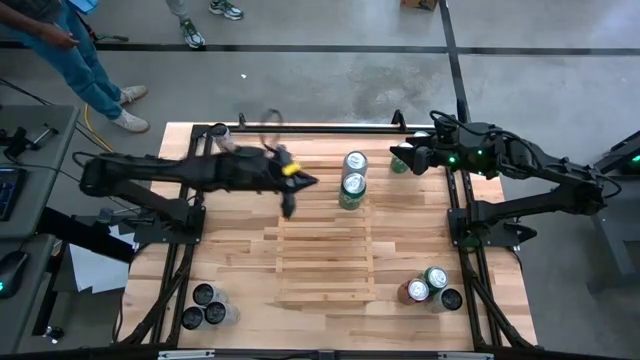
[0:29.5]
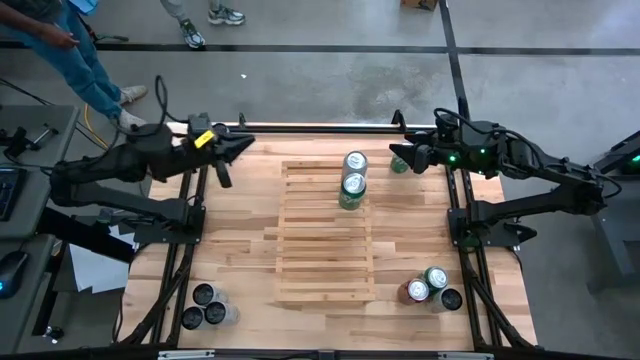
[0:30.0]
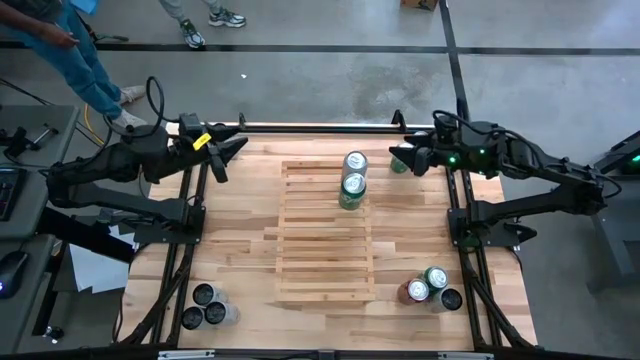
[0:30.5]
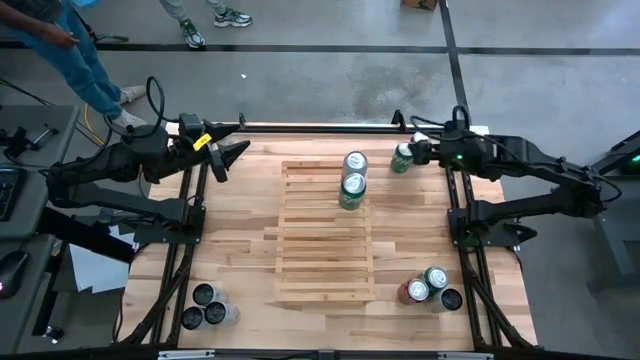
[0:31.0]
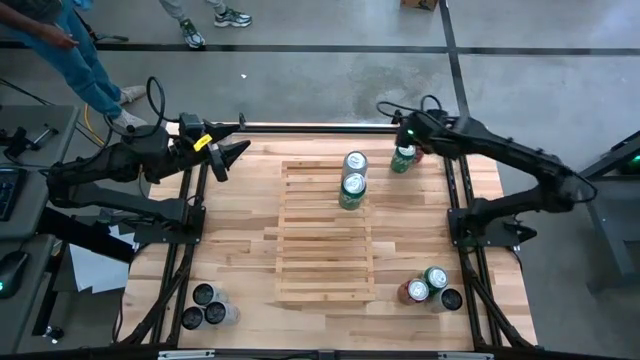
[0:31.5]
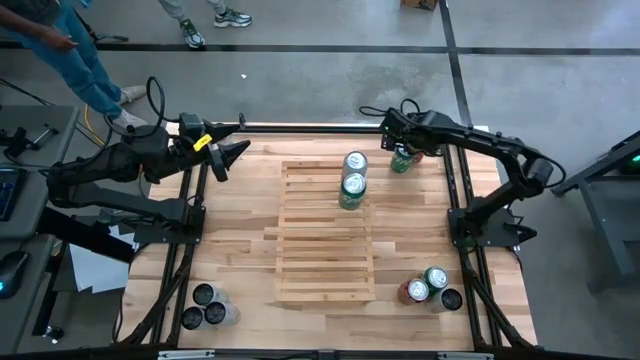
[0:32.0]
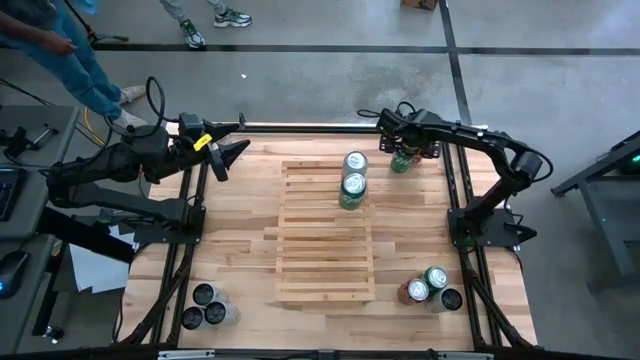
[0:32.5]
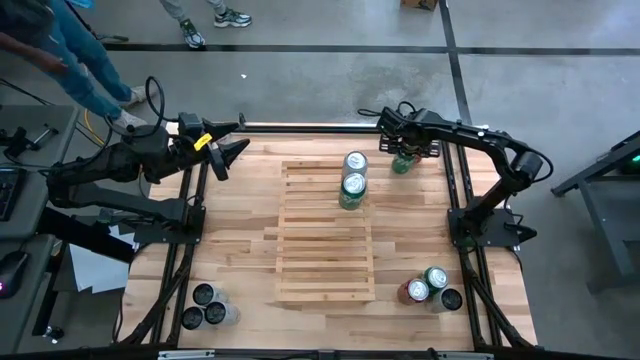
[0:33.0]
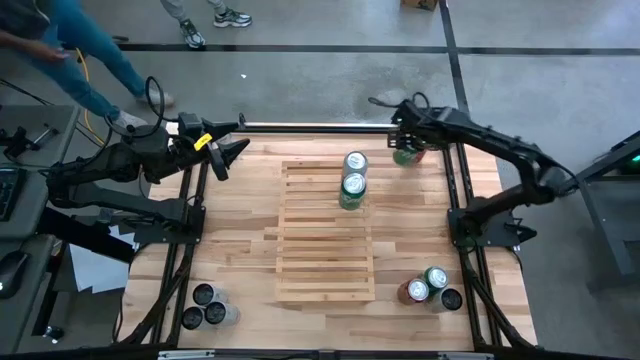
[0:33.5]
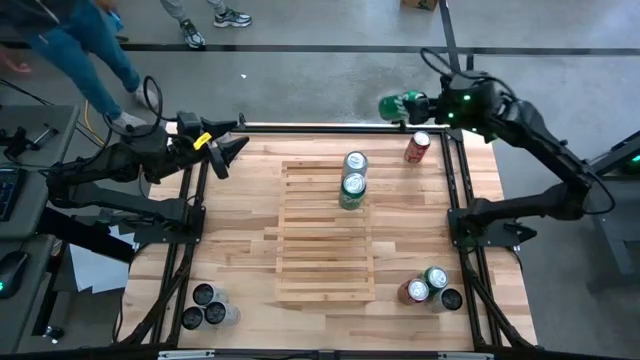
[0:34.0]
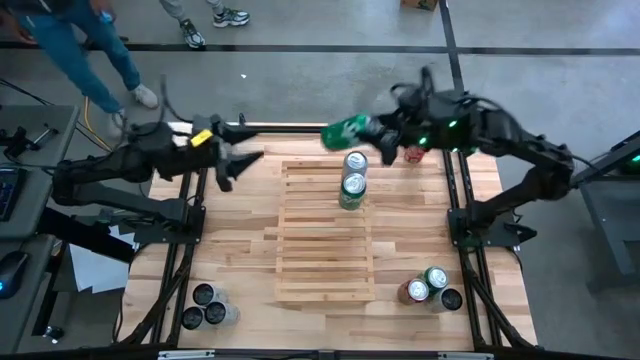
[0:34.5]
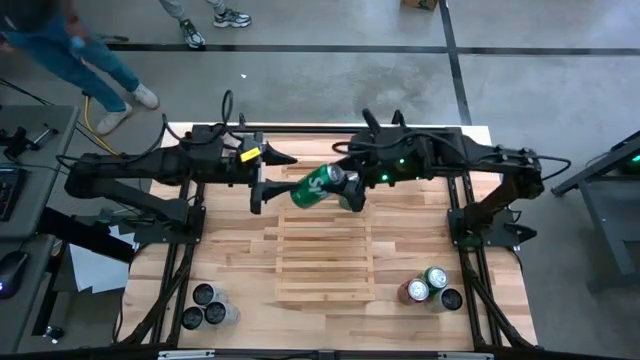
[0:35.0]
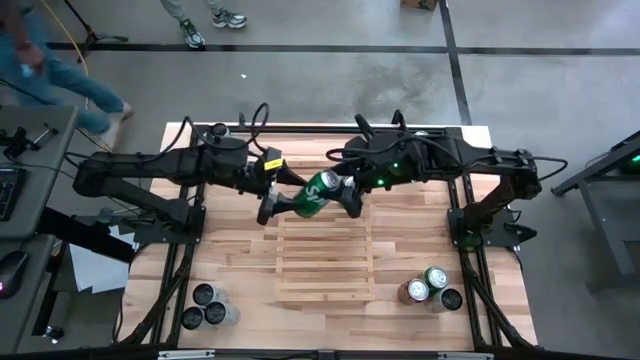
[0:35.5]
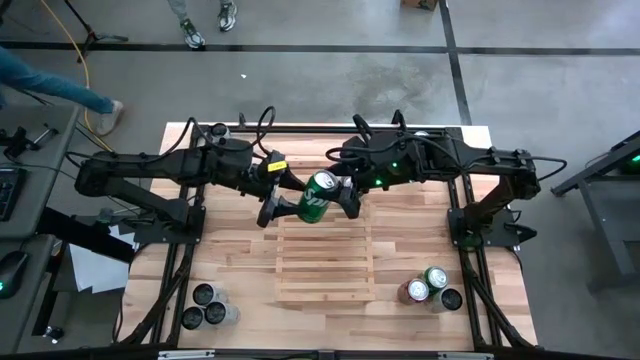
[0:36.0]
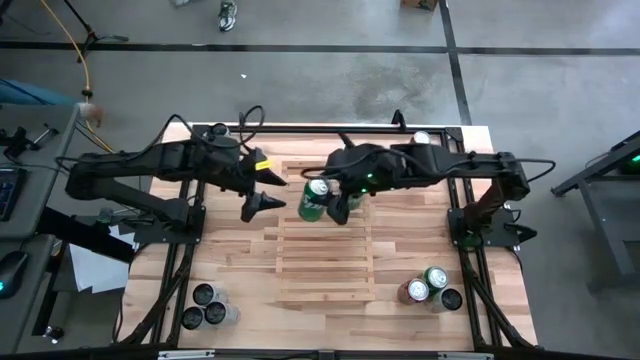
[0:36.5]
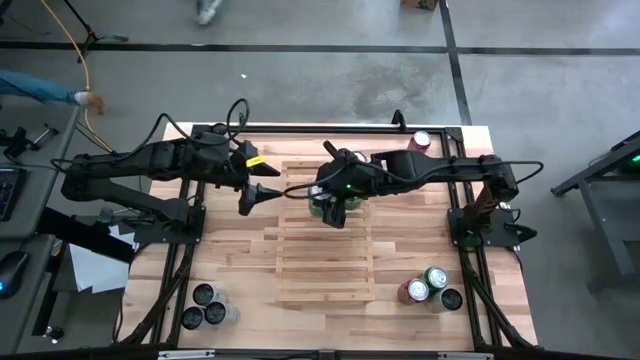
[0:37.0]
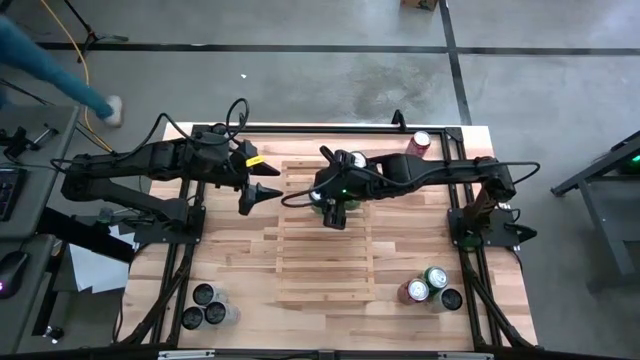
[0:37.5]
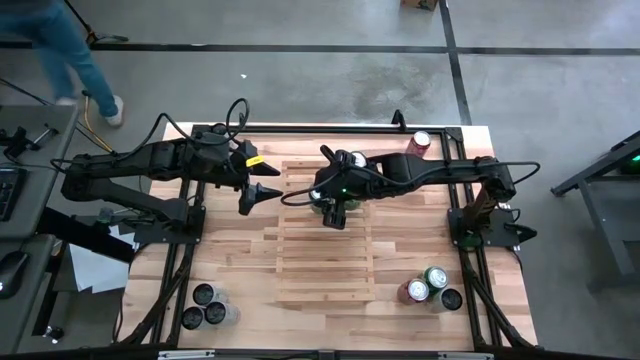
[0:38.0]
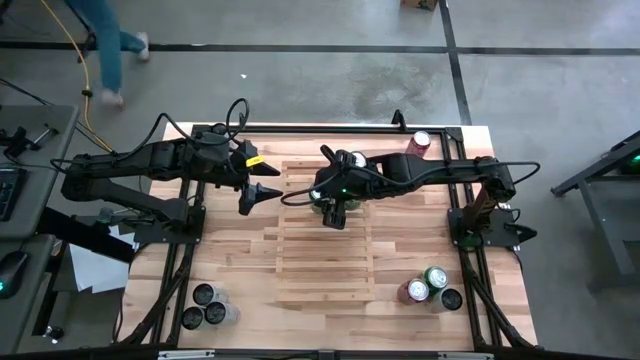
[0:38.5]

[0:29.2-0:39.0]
Task: Place canned beverage on shelf
Put the top green soda can on the shelf aligned with the other green soda can

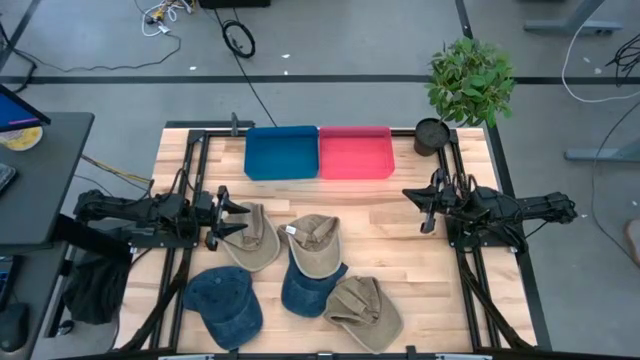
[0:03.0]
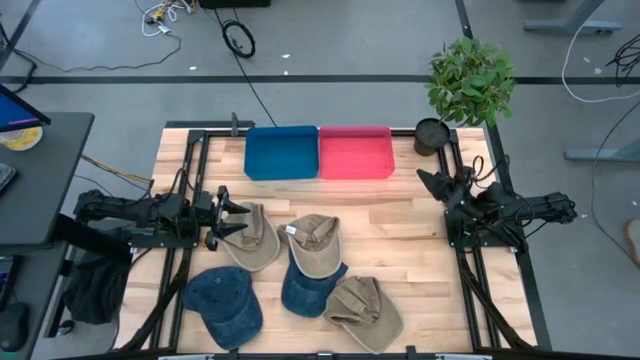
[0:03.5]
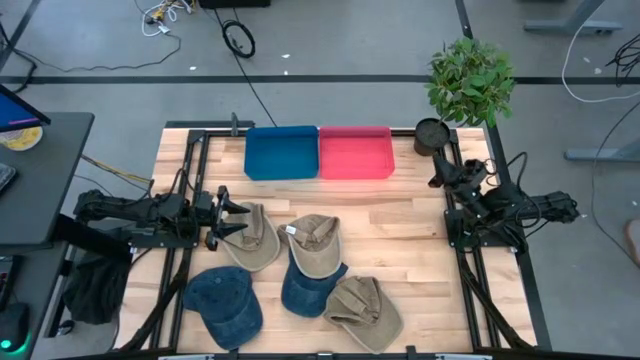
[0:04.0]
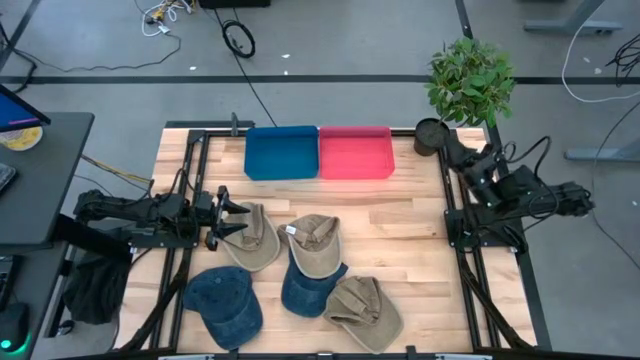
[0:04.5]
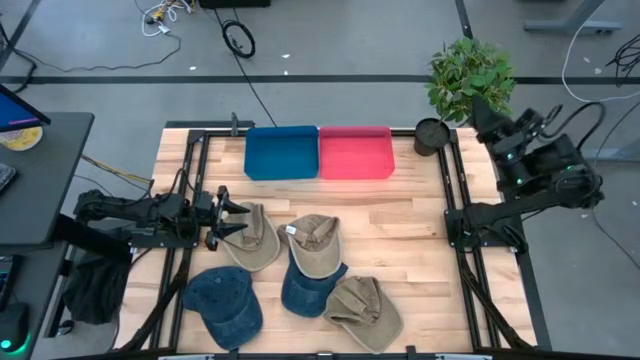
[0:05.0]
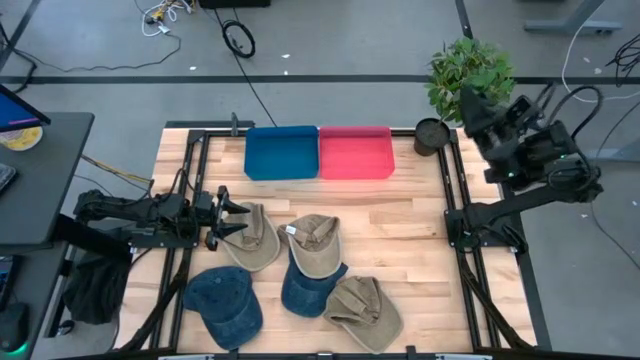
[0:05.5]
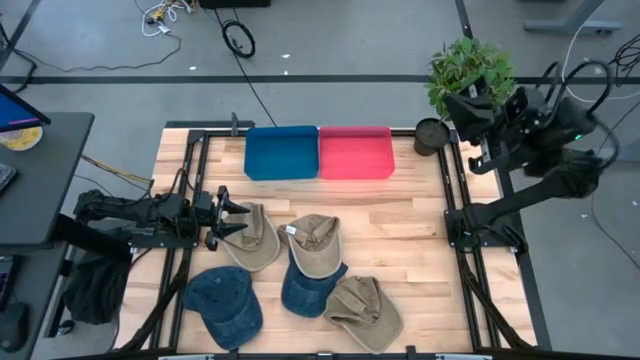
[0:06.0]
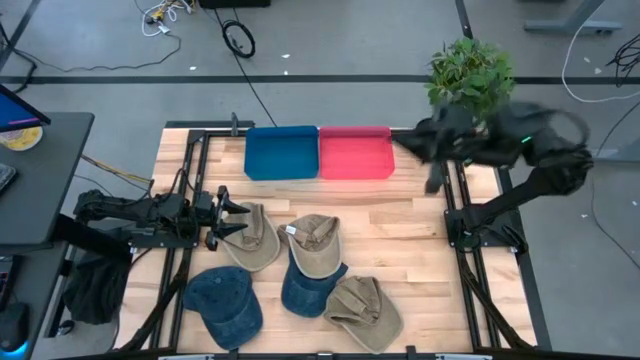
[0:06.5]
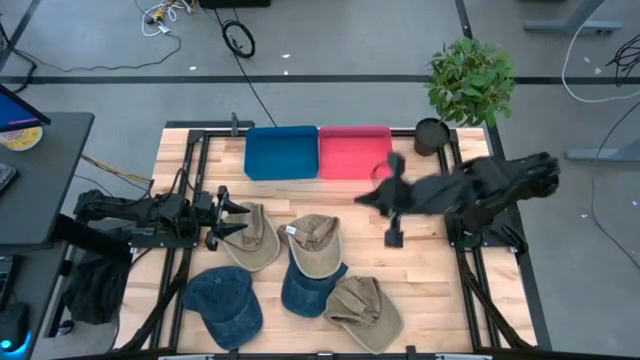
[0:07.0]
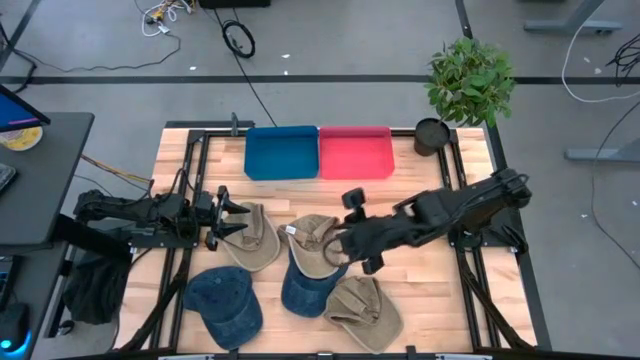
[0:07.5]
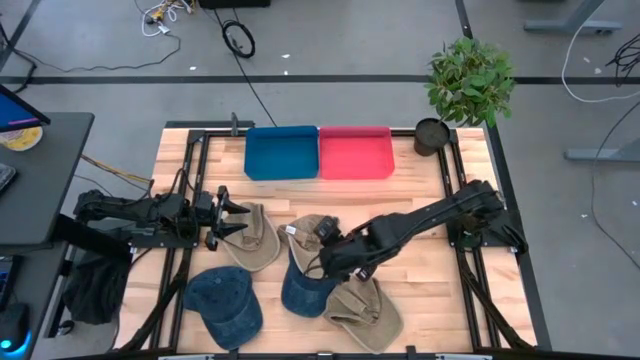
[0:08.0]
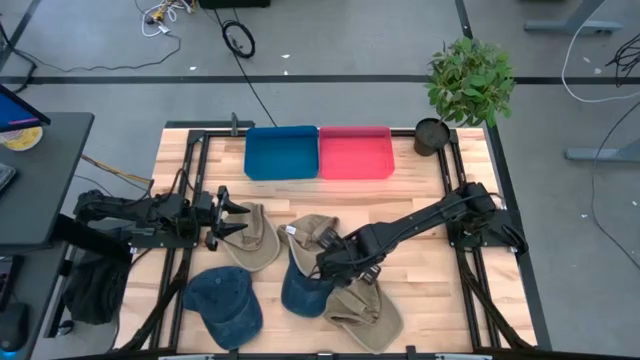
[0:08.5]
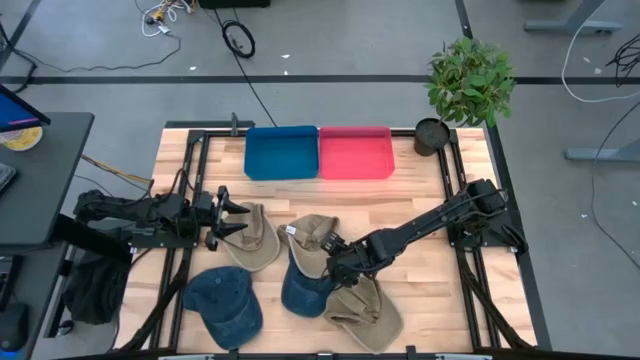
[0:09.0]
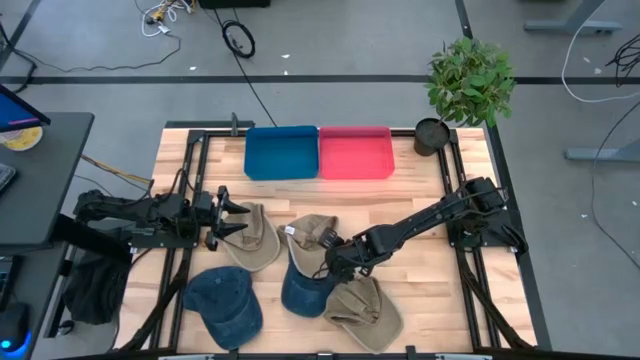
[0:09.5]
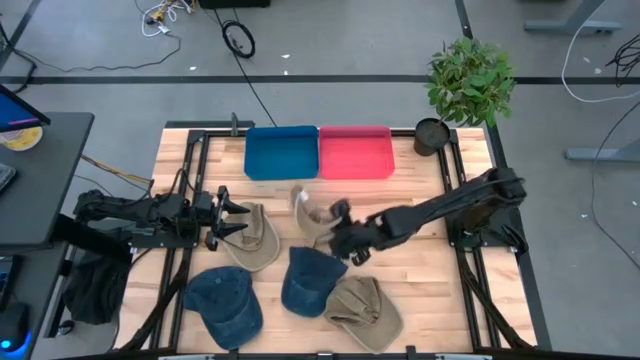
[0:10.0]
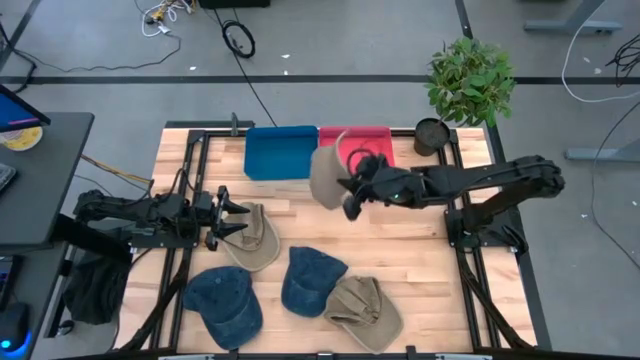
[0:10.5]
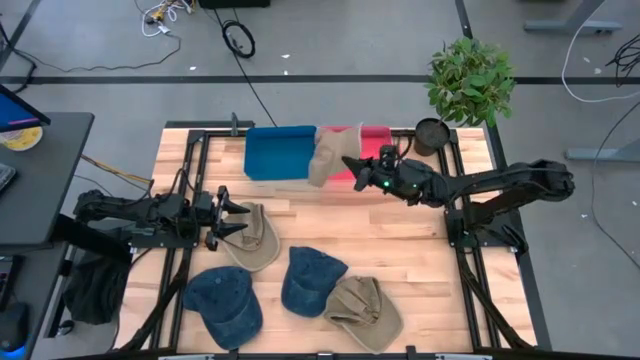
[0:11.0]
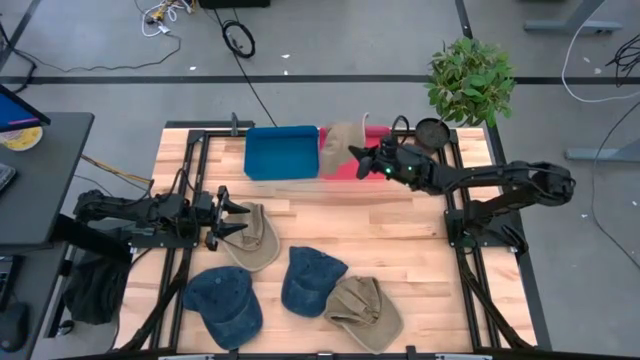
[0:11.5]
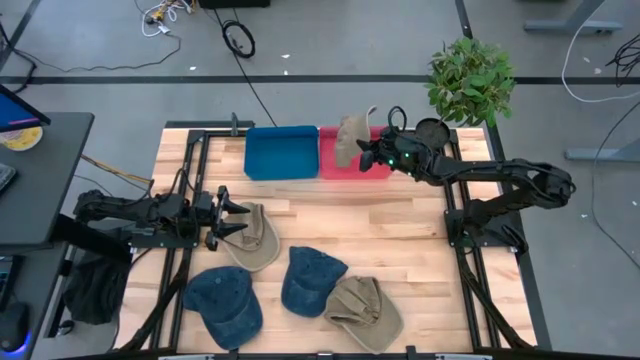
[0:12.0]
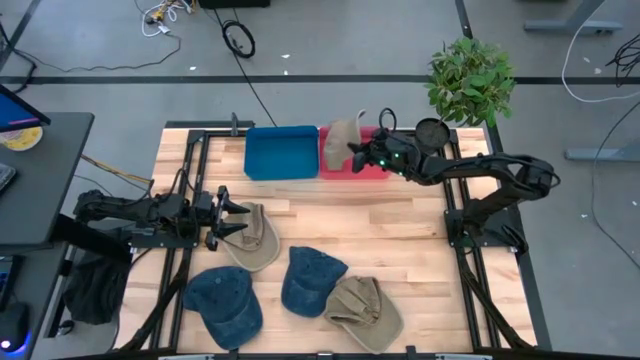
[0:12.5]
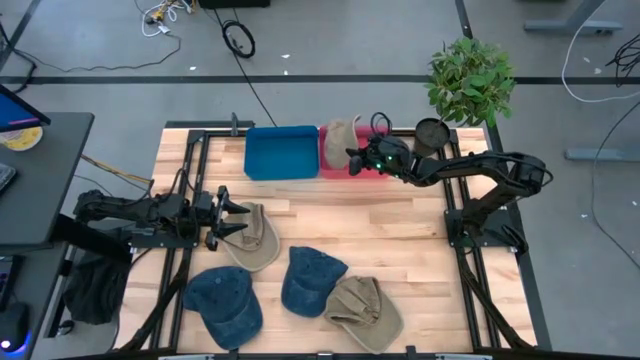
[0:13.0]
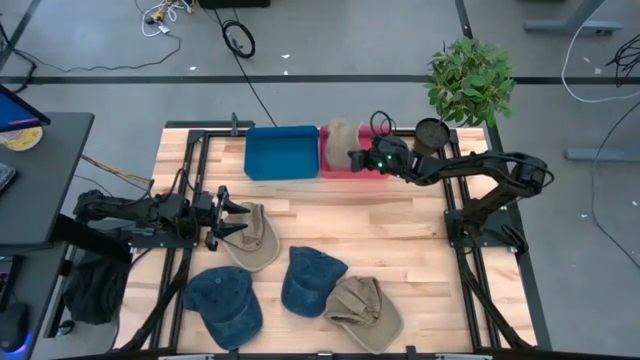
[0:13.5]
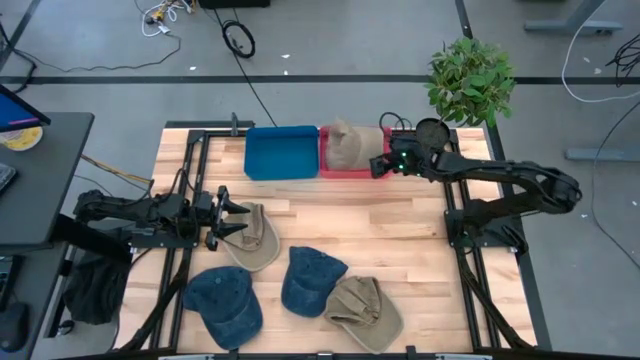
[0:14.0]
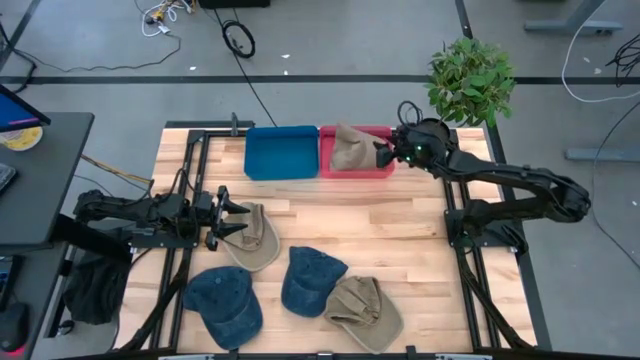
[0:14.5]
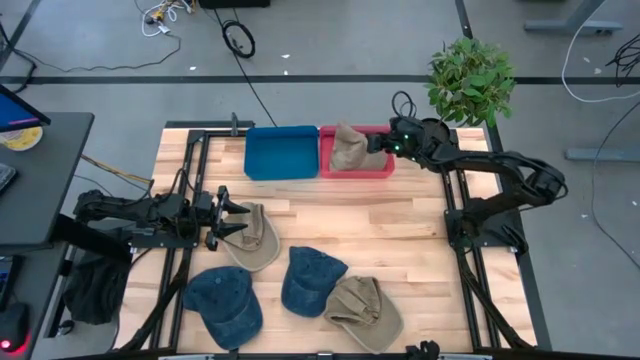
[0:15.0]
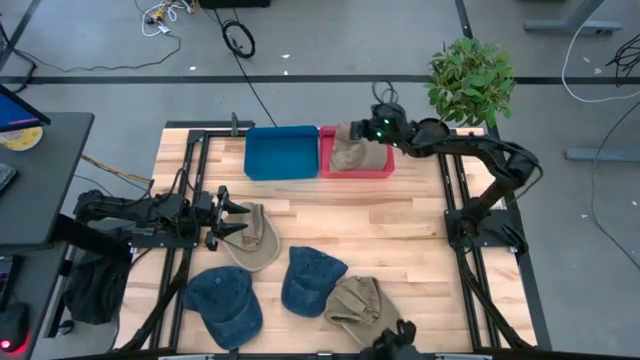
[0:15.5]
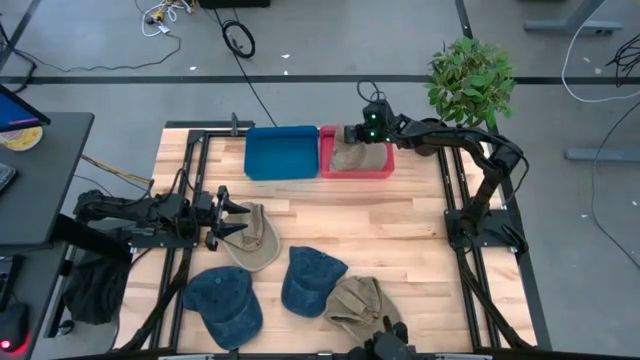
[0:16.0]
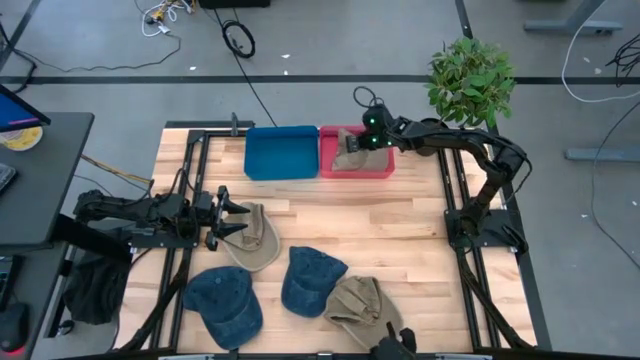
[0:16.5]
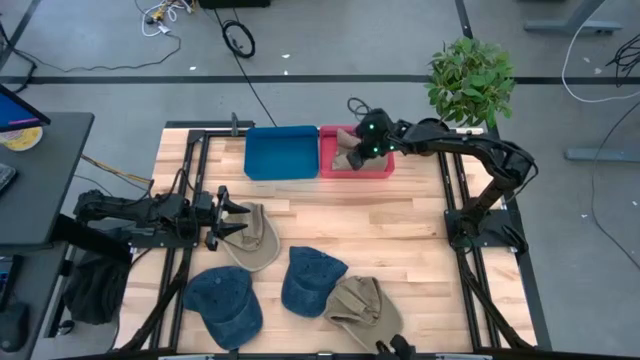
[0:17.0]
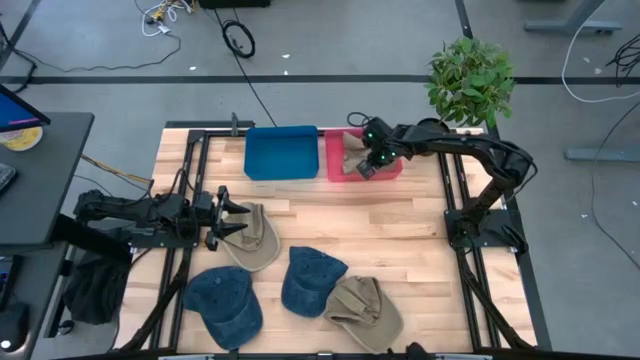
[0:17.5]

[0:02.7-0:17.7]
Task: Pick & Place hat
Put the top right brown cap into the red bin
